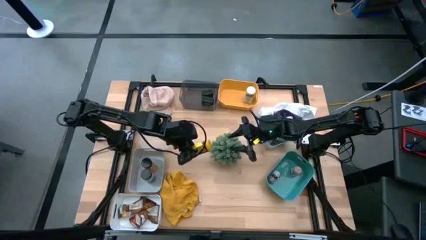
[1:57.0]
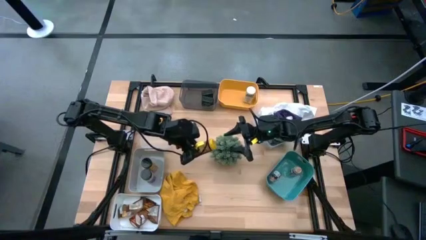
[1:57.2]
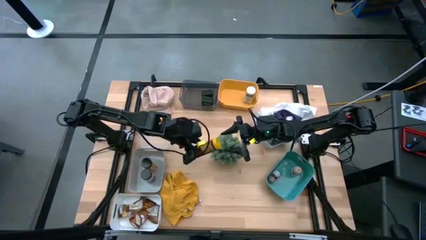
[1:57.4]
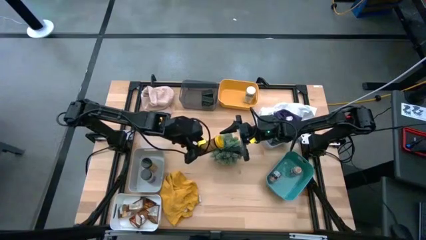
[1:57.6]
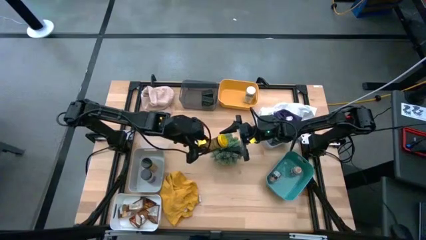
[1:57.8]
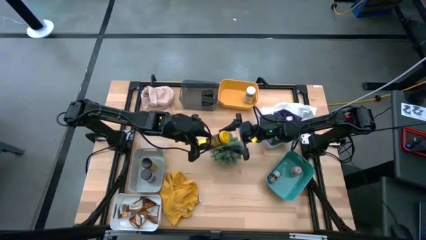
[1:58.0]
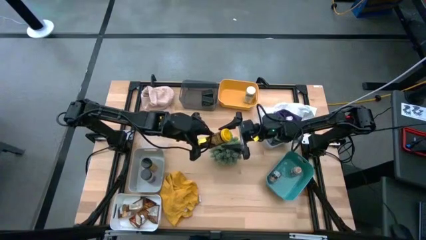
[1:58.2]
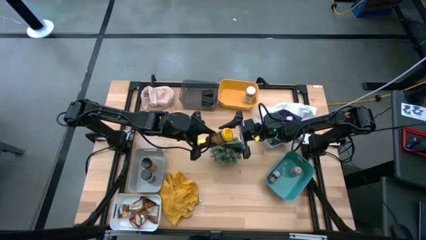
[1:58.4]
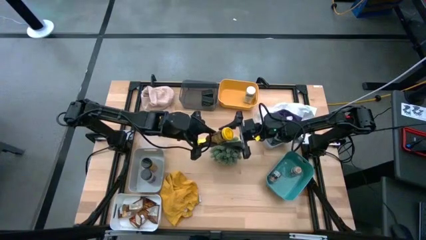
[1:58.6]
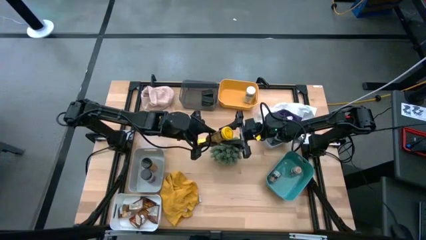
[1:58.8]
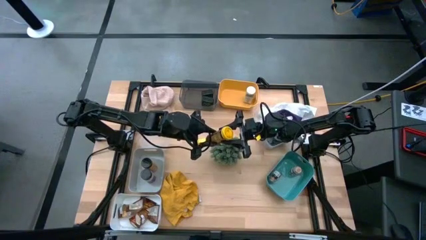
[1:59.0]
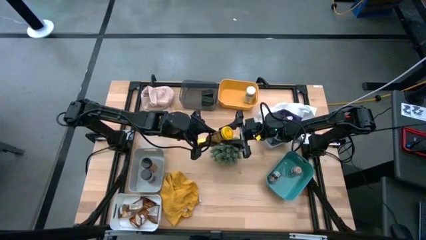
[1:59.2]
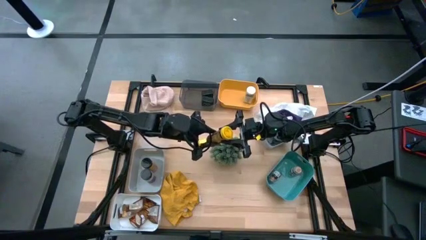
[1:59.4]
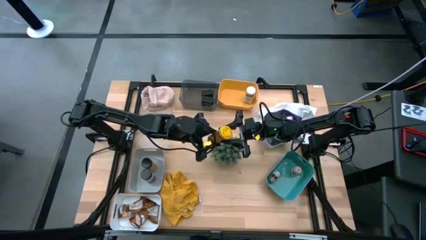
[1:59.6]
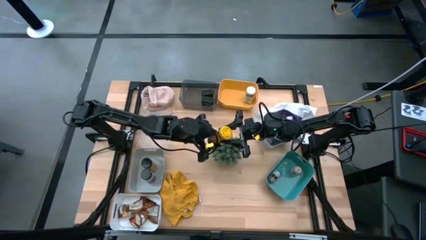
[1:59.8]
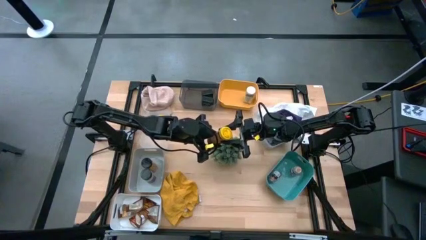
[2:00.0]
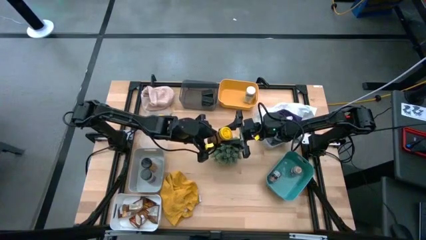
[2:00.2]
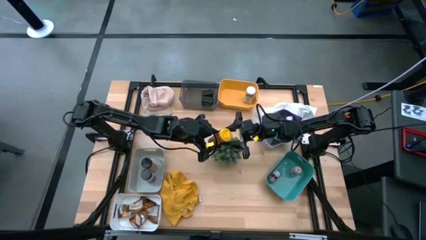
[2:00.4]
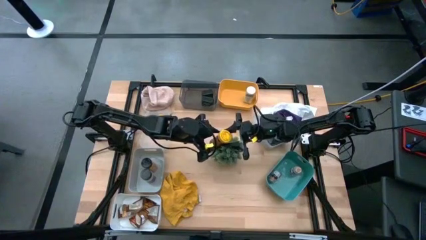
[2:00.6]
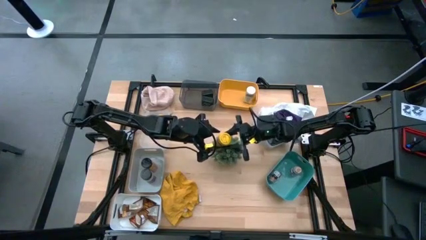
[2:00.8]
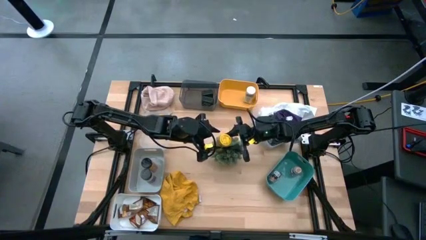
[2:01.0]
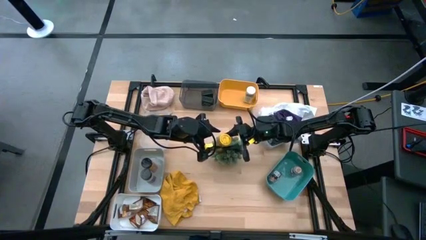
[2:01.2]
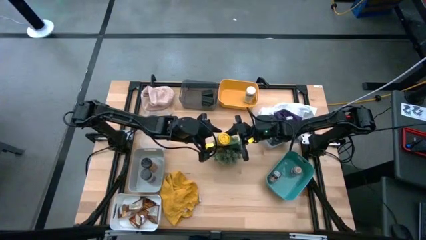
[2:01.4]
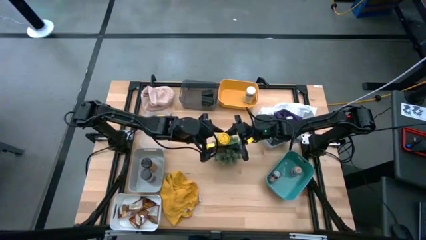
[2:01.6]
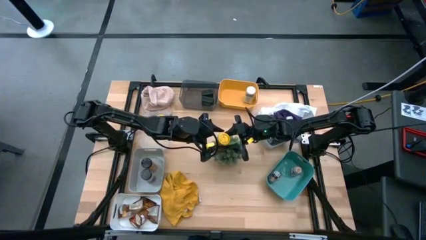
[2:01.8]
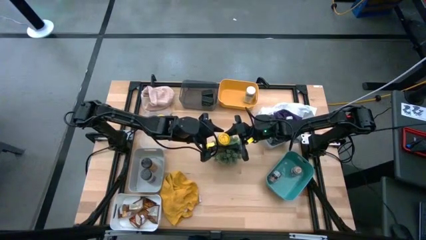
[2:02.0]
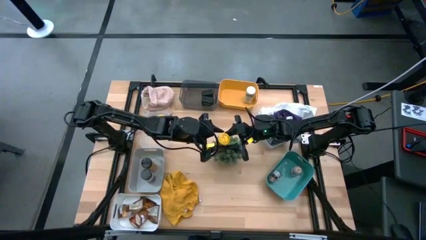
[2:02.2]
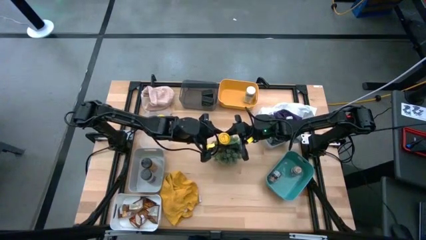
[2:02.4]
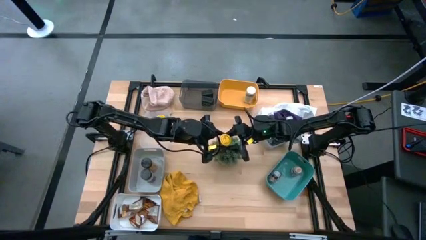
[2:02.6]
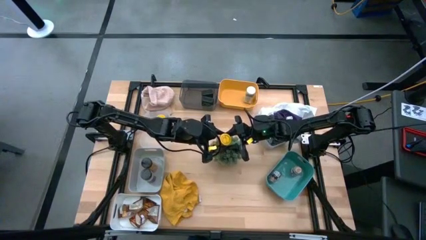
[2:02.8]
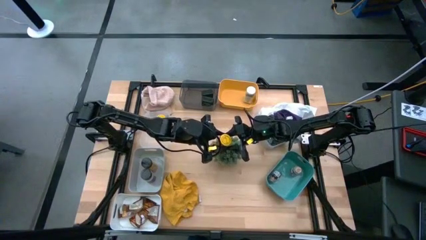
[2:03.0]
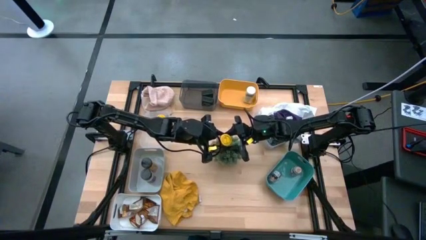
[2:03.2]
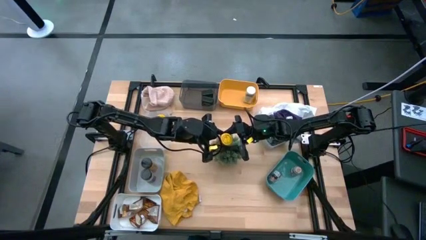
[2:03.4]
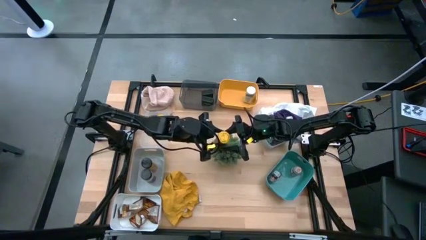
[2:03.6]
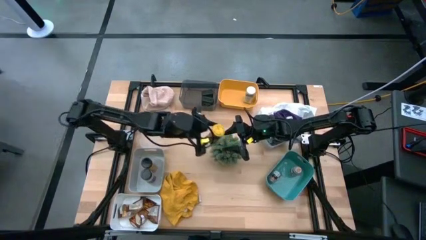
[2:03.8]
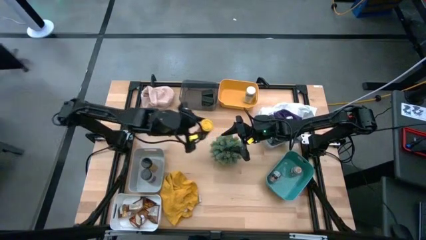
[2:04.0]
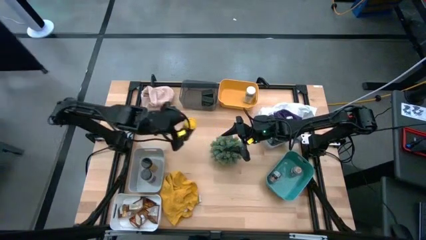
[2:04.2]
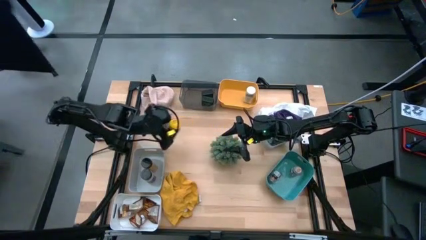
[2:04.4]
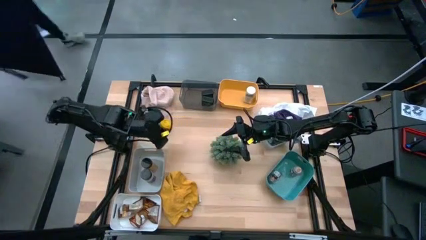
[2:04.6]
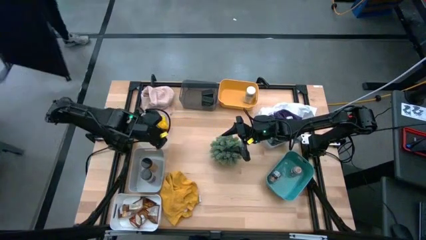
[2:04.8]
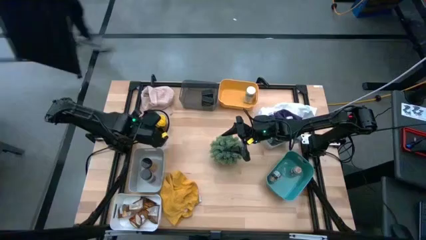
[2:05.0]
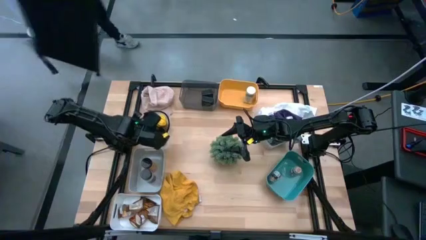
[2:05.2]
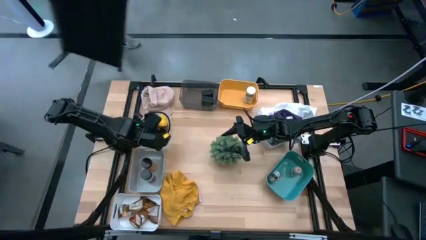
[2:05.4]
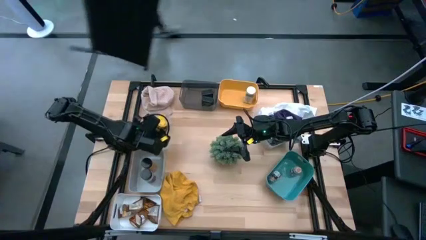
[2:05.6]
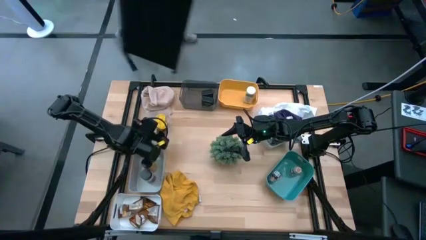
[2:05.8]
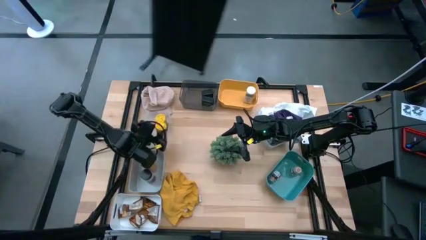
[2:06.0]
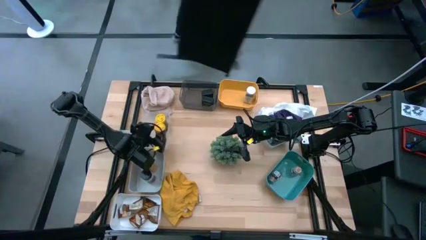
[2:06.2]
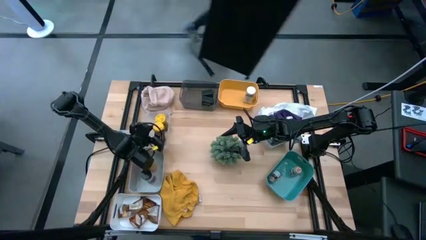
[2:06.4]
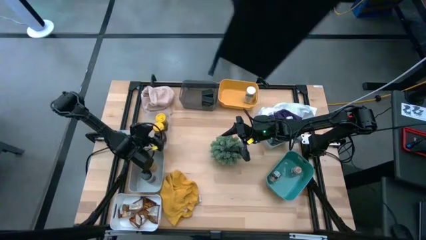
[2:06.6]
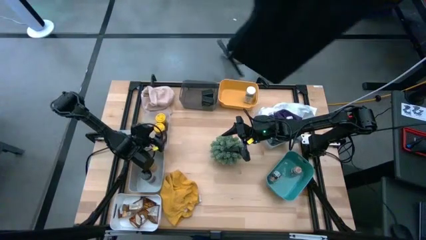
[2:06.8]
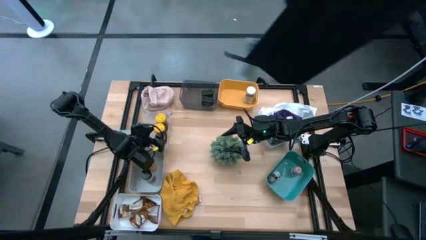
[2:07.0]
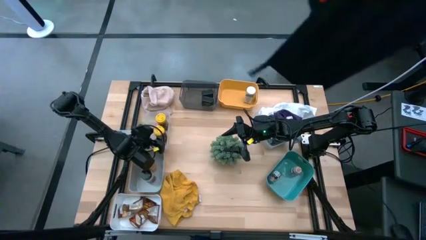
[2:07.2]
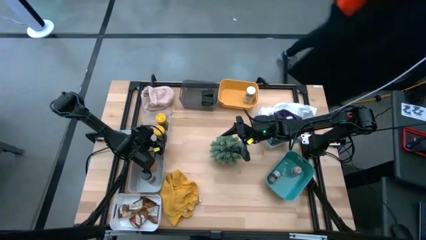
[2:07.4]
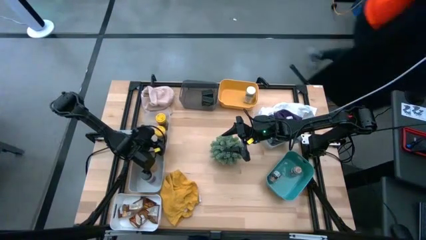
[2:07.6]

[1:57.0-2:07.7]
Task: Sort spices by type
Put the yellow spice bottle into the transparent bin

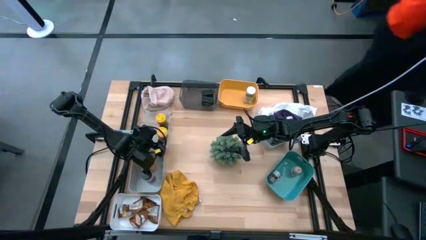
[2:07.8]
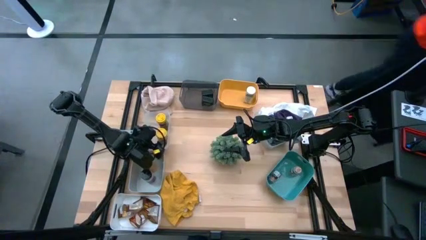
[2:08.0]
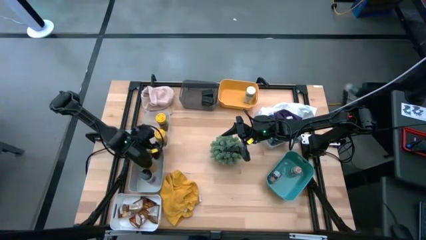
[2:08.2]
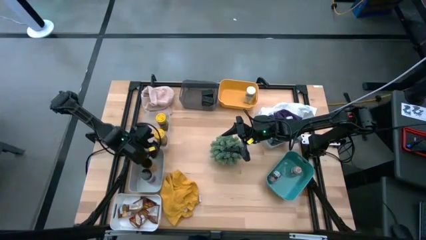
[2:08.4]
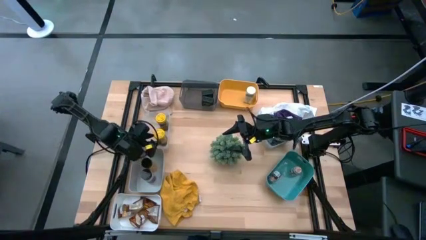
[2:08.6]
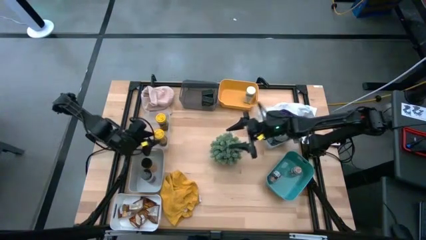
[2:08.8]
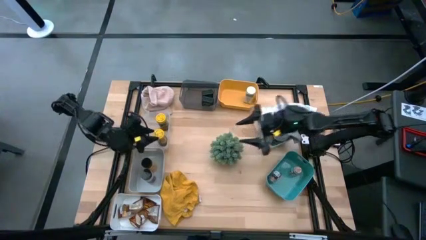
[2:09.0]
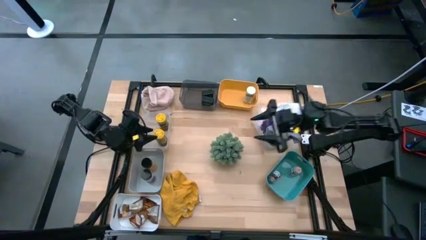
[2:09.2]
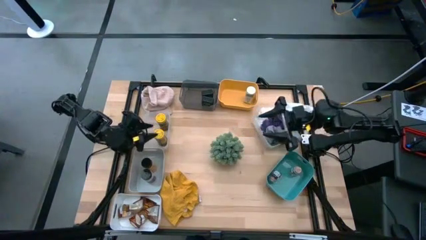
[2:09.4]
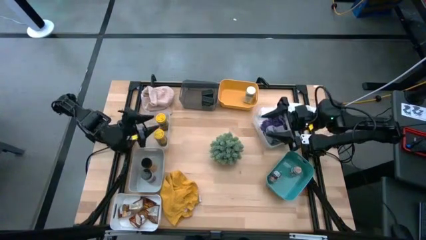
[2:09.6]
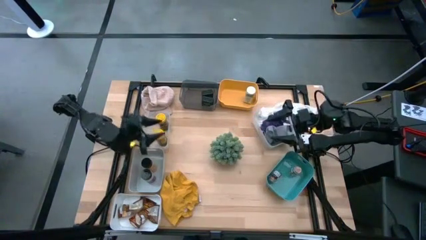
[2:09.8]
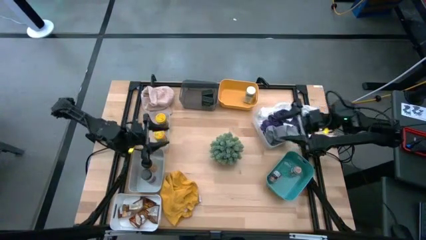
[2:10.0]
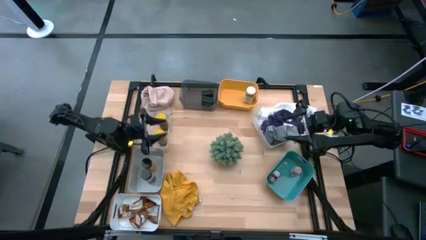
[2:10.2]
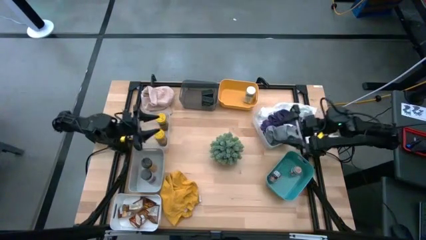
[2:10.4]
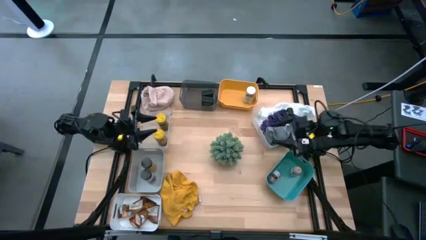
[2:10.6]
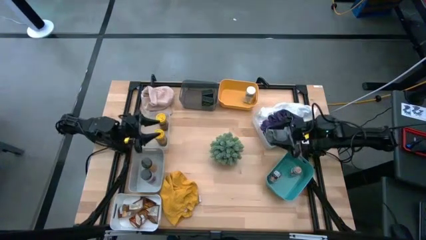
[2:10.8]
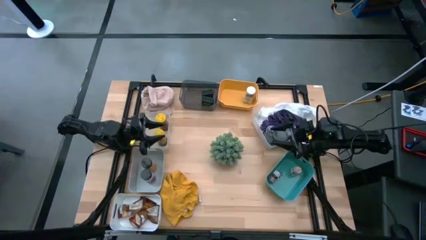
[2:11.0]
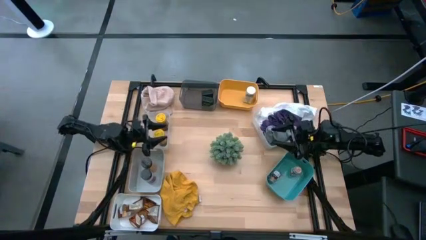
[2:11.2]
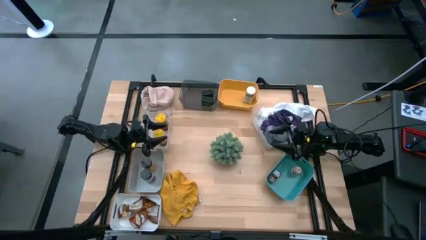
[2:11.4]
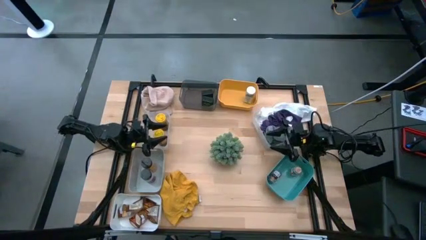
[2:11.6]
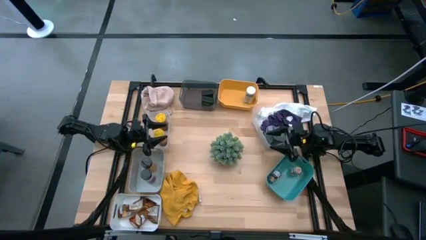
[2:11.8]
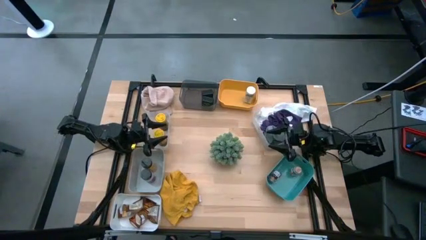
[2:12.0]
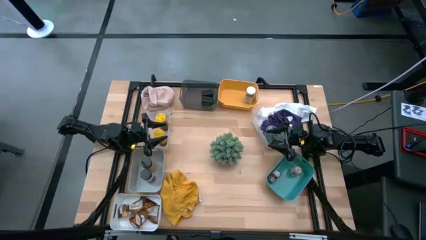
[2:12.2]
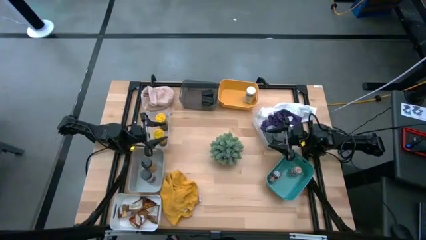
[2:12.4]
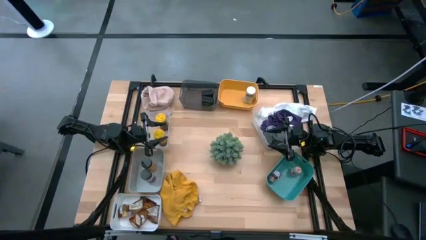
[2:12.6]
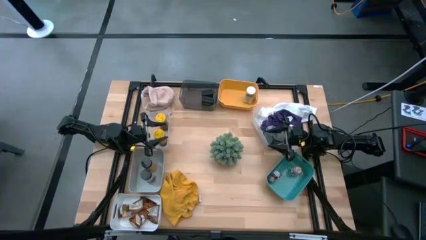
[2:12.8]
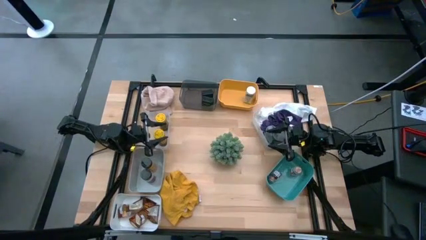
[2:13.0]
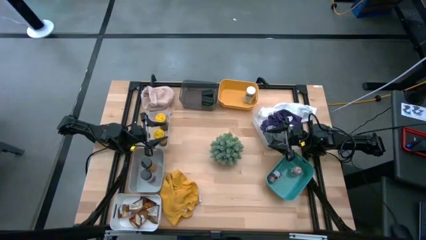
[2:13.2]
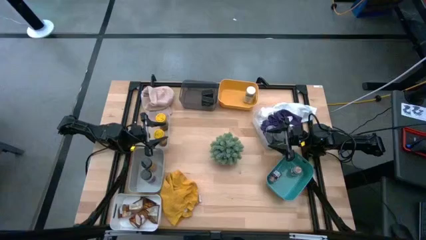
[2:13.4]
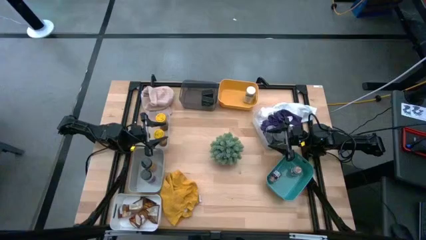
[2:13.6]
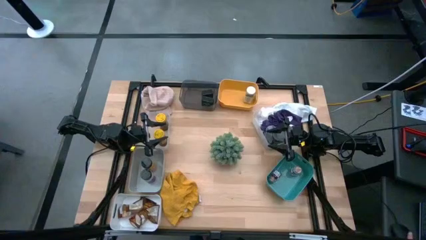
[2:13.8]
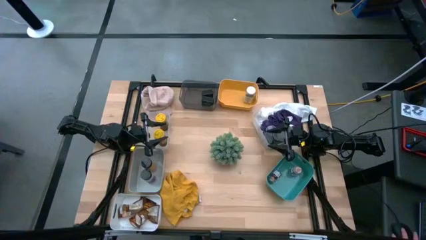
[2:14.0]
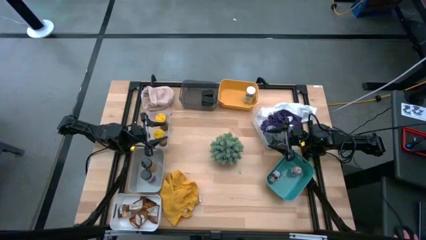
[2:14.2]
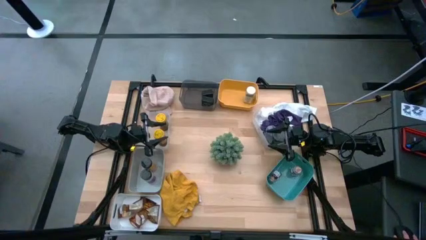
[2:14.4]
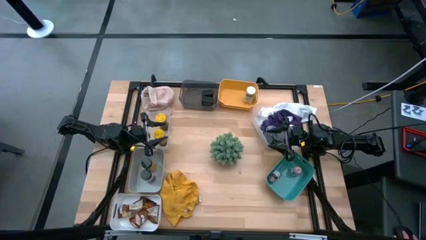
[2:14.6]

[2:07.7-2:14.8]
Return to Home position
